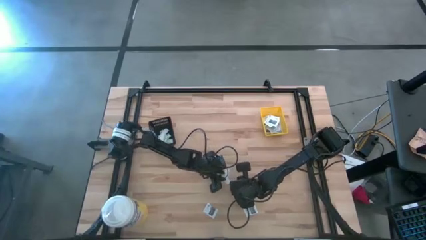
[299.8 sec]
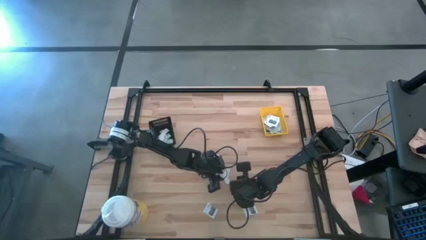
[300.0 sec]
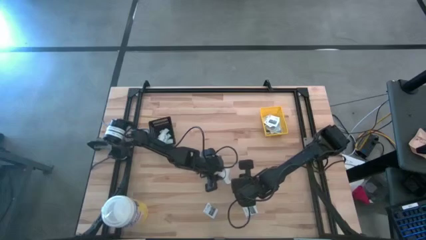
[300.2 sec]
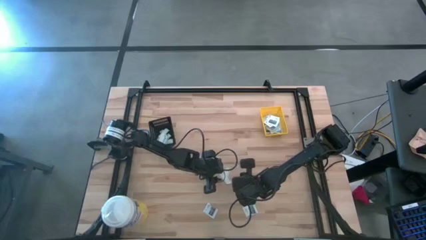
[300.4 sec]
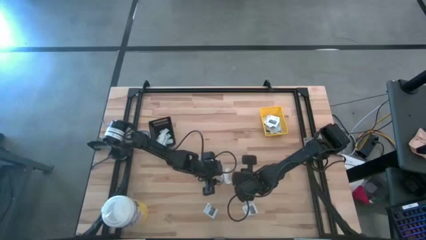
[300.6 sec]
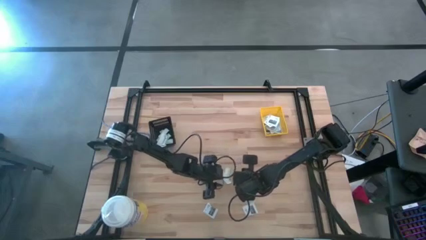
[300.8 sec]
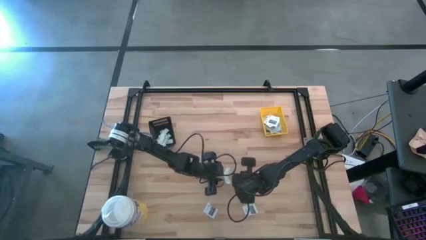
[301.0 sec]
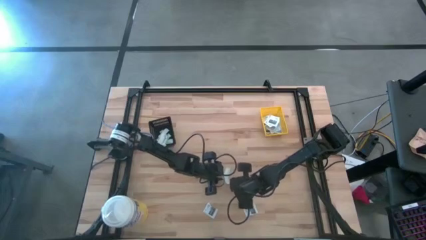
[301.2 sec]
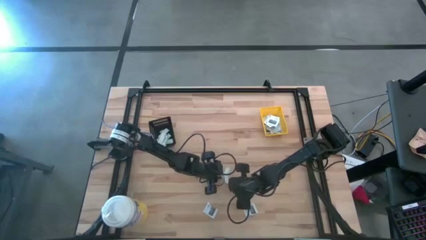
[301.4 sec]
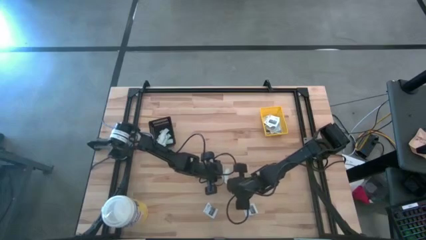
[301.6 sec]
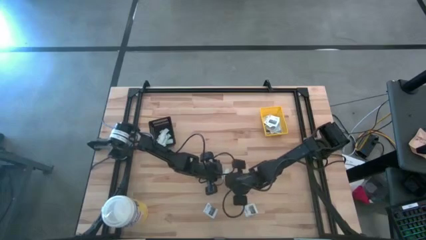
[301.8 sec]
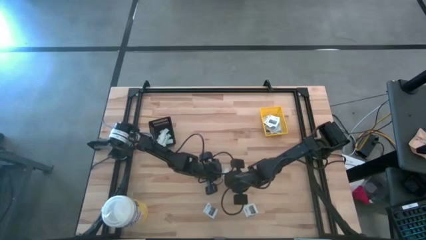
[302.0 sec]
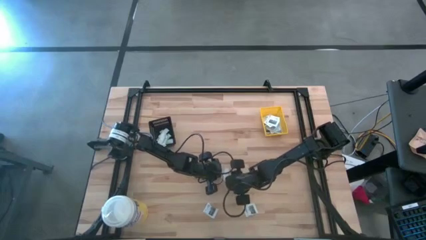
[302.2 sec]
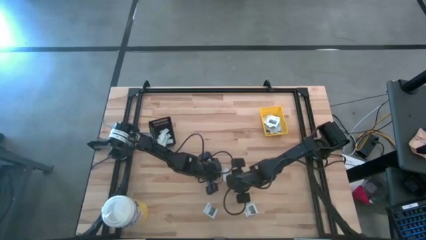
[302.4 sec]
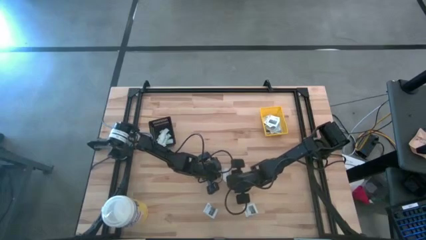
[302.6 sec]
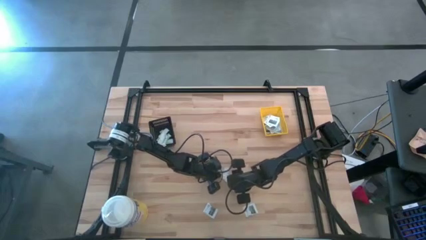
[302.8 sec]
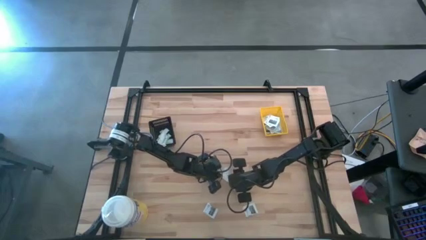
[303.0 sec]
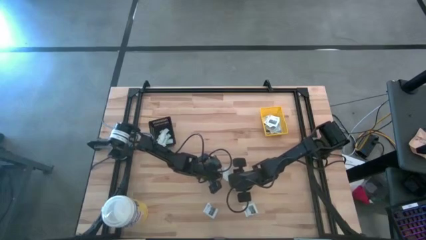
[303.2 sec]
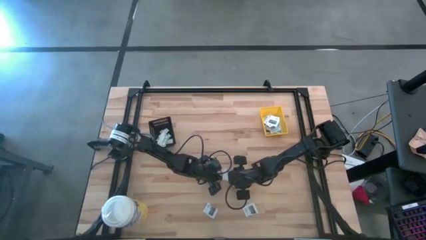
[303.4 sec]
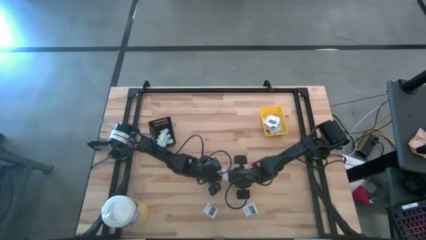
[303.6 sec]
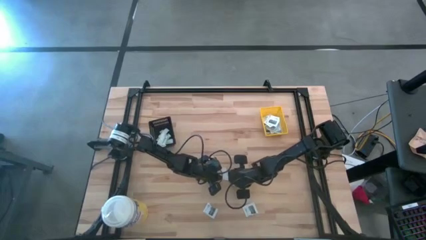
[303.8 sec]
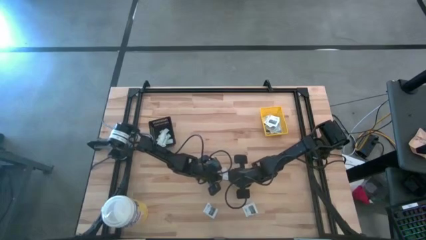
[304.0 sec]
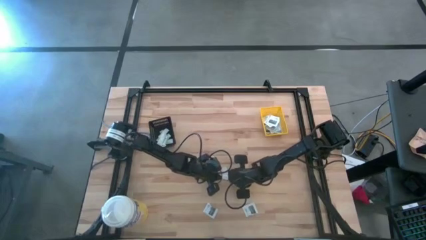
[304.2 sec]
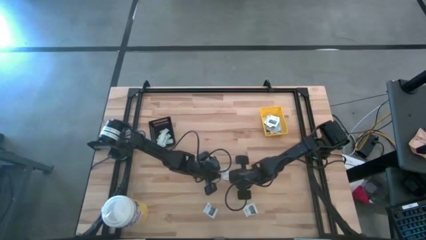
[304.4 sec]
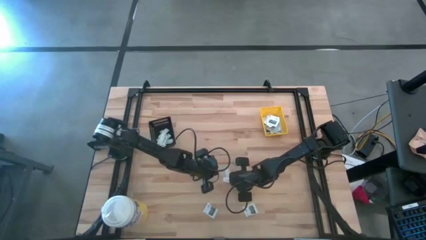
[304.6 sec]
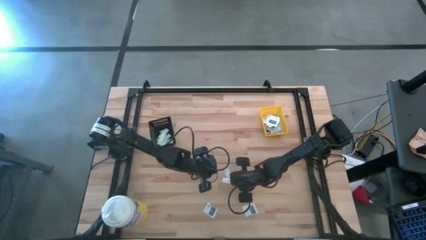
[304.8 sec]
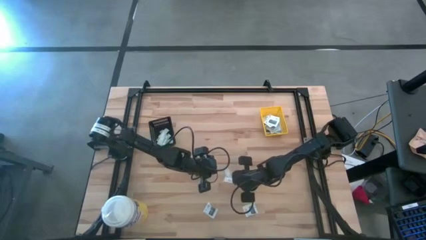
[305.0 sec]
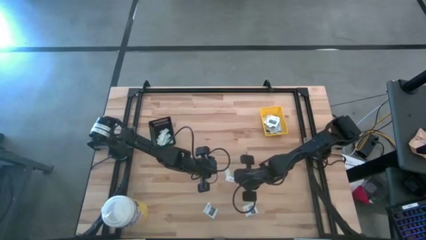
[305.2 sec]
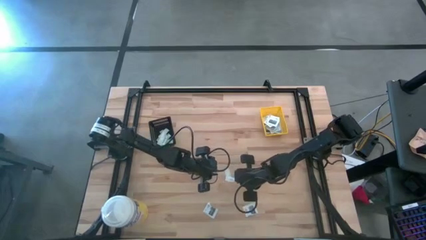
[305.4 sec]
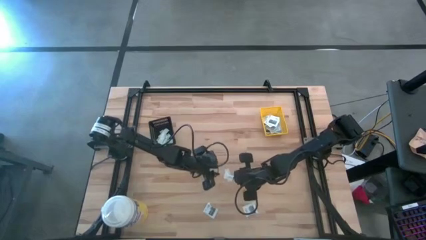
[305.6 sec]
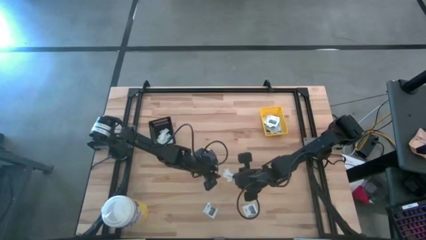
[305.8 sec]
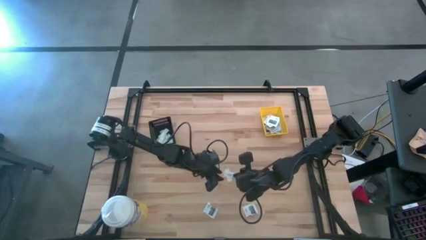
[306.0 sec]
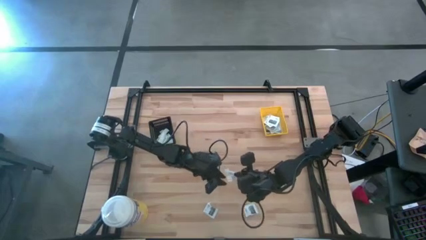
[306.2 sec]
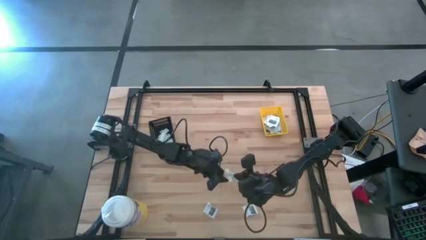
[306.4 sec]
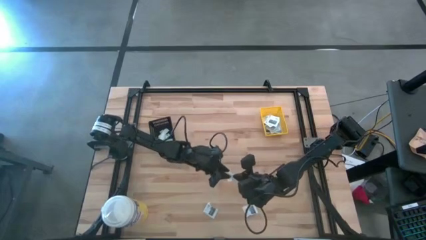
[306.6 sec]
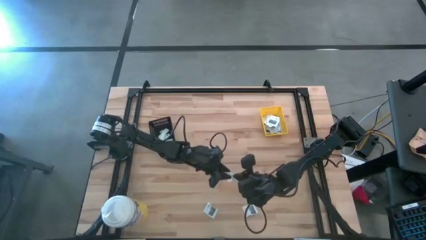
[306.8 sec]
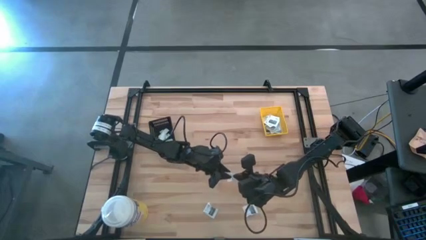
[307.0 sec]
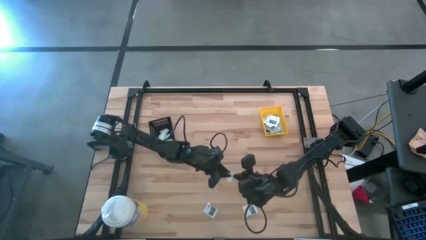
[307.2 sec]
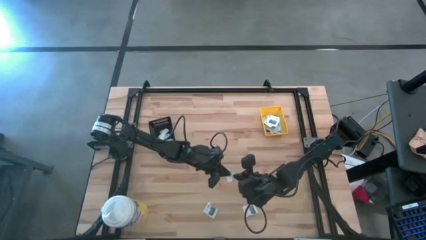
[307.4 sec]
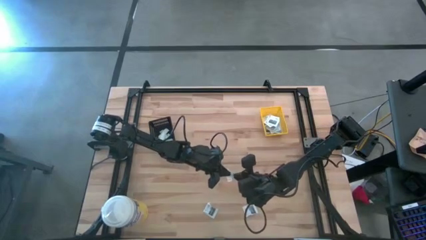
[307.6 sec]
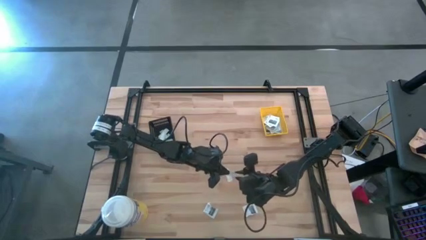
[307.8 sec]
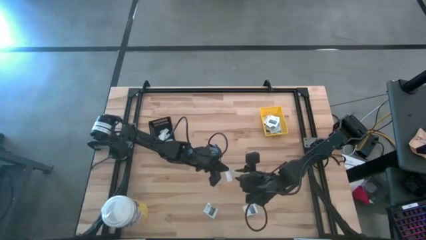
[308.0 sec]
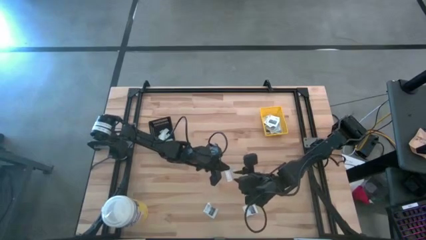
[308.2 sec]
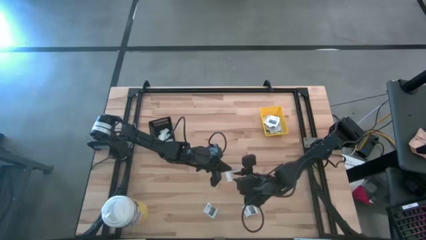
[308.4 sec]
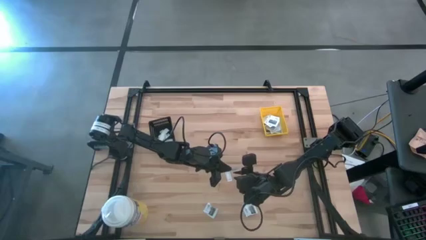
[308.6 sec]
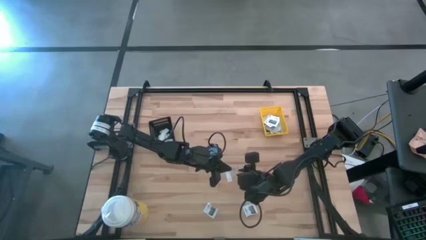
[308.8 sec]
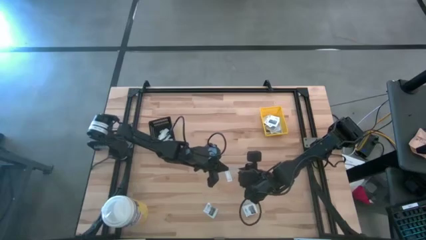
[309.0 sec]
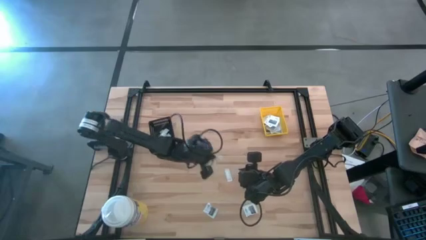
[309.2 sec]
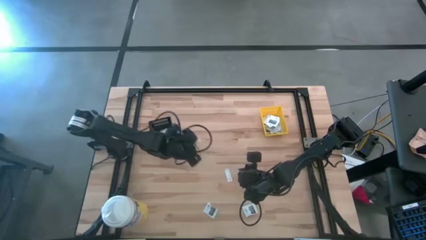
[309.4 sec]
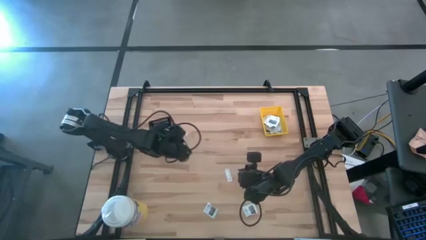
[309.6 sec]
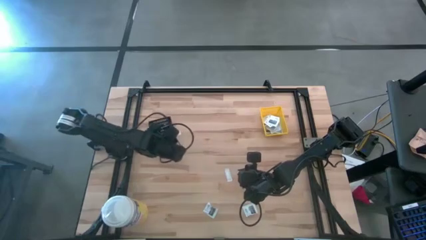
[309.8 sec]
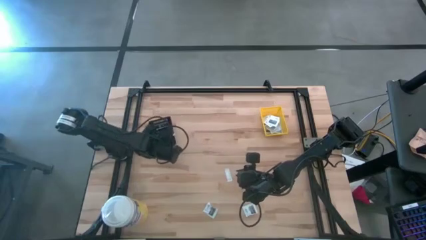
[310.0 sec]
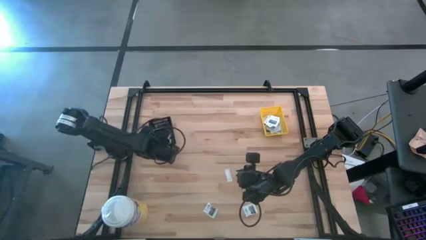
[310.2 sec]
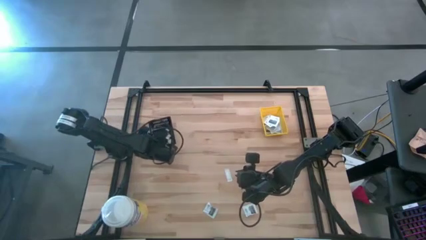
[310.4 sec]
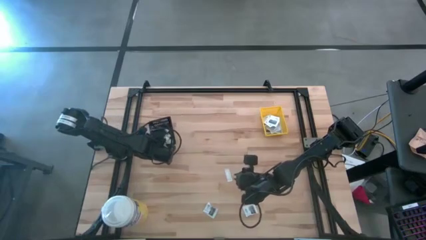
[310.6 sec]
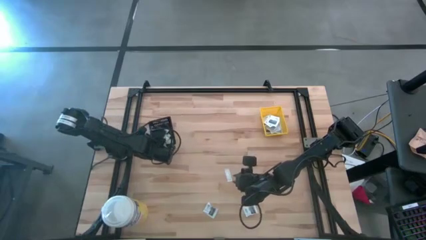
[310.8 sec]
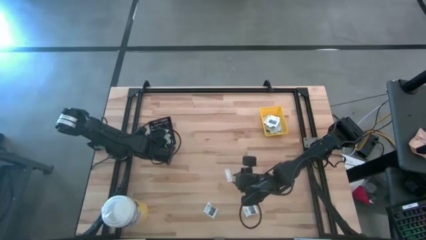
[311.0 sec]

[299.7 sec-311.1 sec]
Task: Pick & Place First Aid Supplies
Put the green bandage into the black bin
